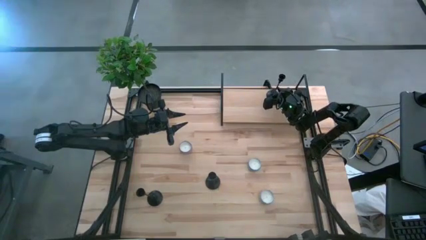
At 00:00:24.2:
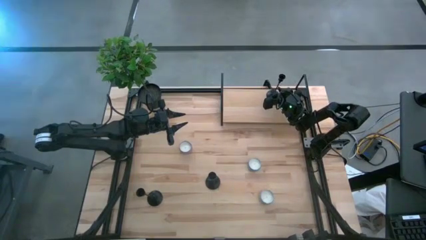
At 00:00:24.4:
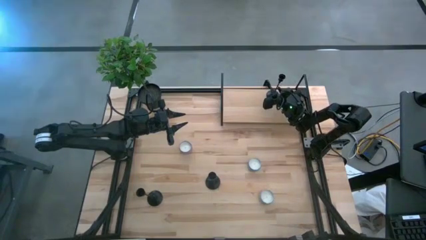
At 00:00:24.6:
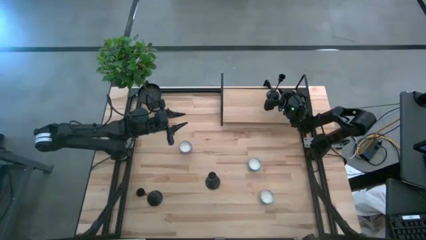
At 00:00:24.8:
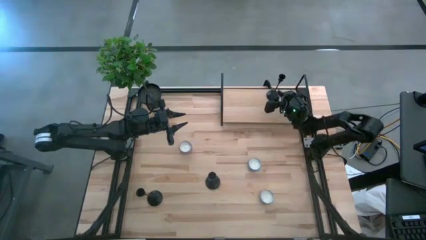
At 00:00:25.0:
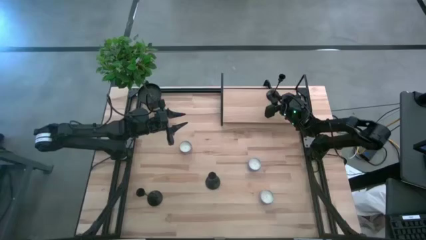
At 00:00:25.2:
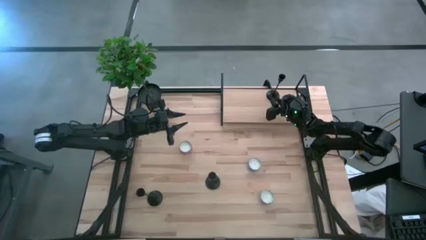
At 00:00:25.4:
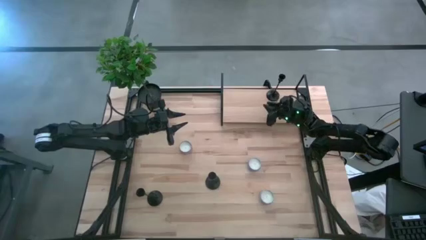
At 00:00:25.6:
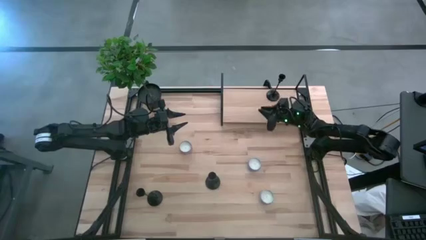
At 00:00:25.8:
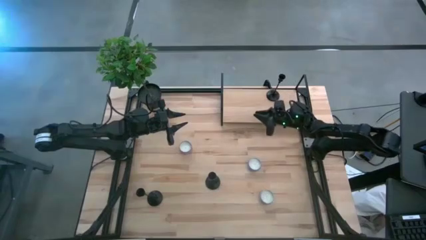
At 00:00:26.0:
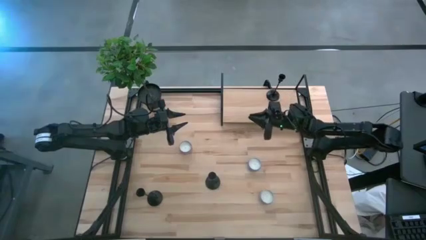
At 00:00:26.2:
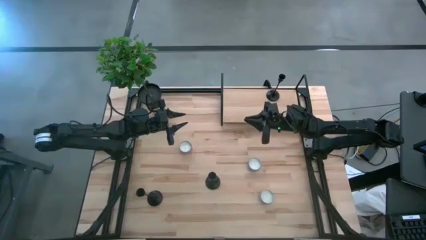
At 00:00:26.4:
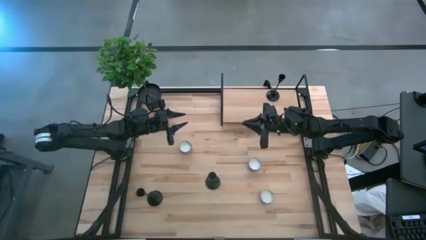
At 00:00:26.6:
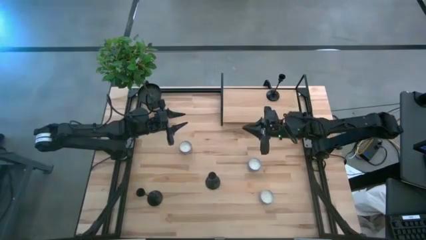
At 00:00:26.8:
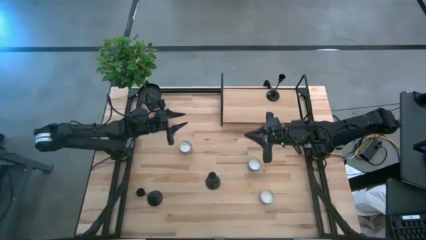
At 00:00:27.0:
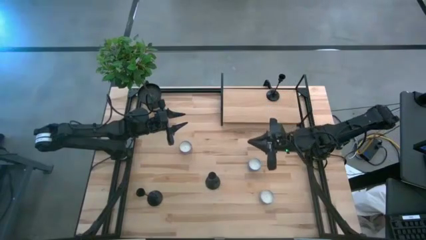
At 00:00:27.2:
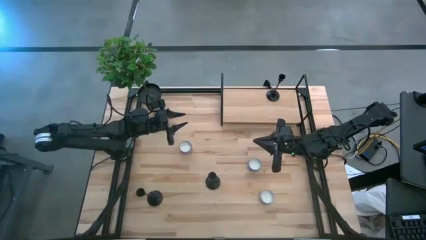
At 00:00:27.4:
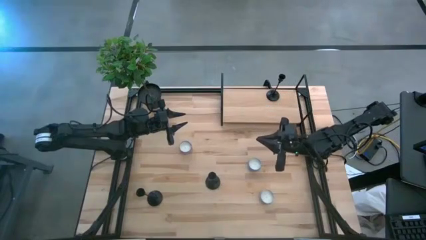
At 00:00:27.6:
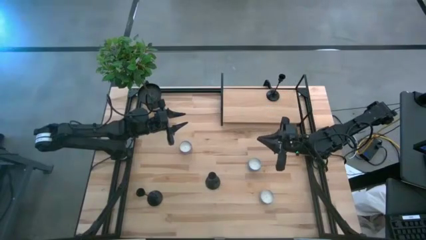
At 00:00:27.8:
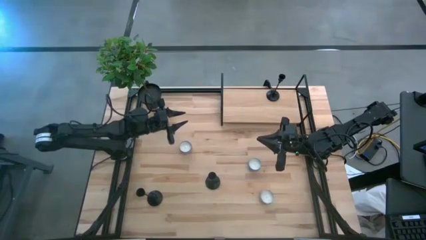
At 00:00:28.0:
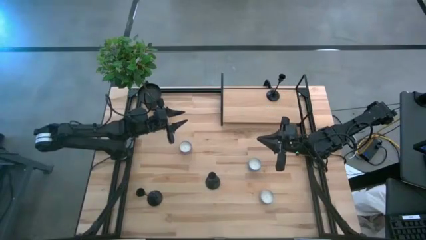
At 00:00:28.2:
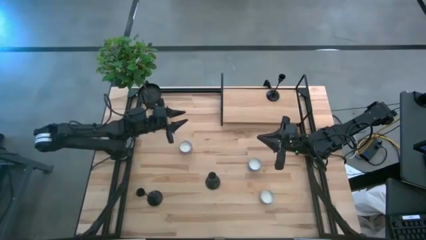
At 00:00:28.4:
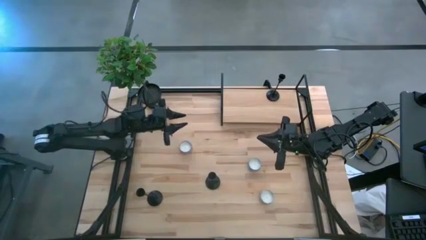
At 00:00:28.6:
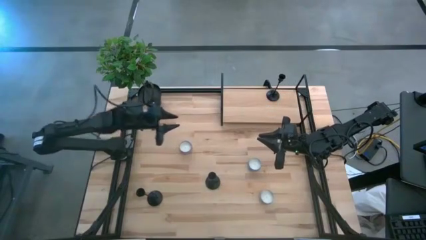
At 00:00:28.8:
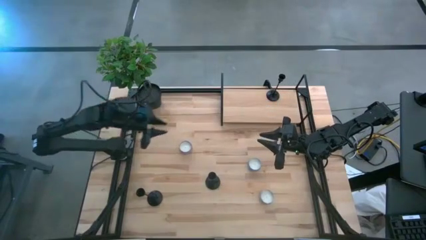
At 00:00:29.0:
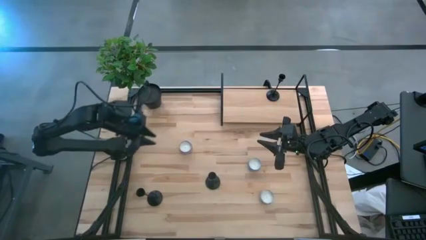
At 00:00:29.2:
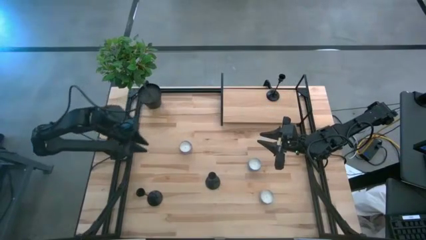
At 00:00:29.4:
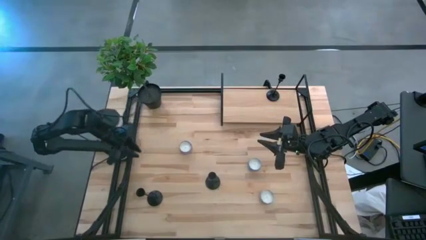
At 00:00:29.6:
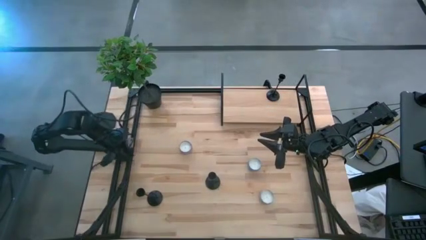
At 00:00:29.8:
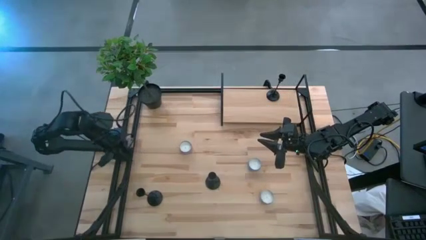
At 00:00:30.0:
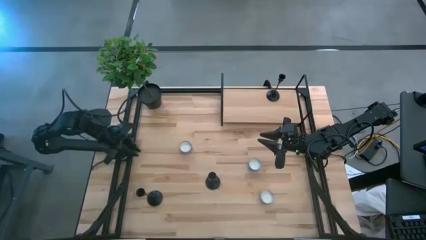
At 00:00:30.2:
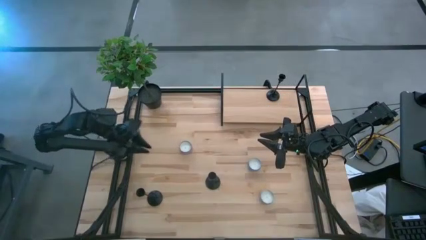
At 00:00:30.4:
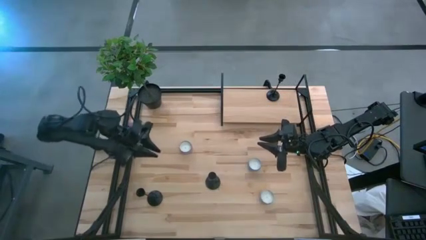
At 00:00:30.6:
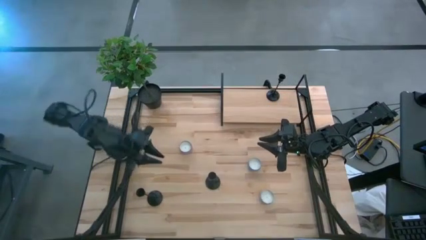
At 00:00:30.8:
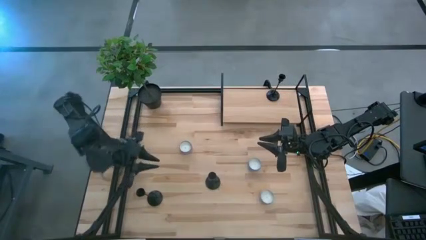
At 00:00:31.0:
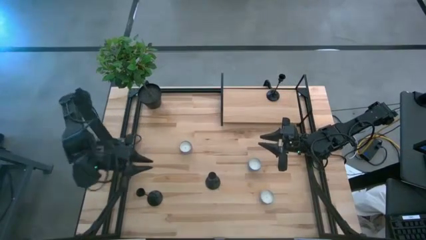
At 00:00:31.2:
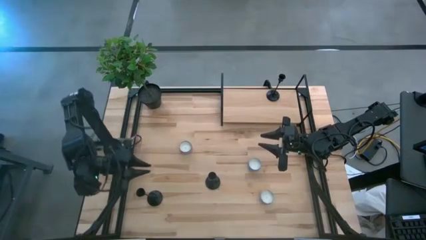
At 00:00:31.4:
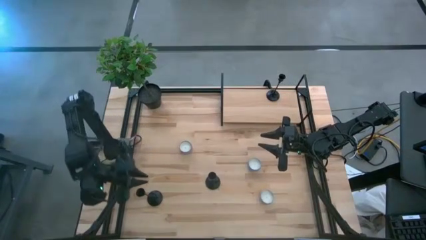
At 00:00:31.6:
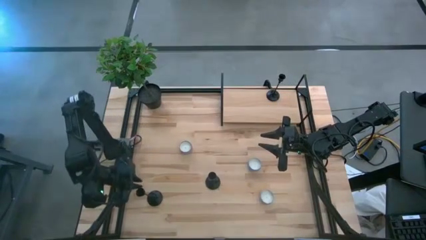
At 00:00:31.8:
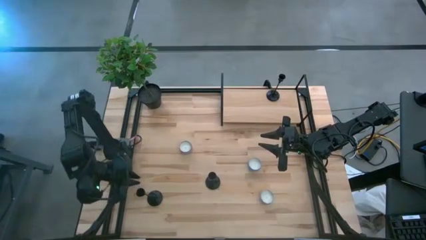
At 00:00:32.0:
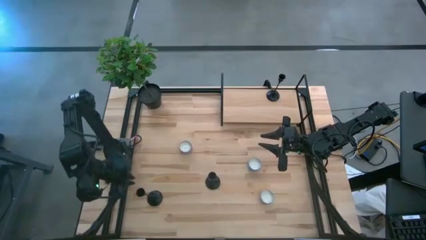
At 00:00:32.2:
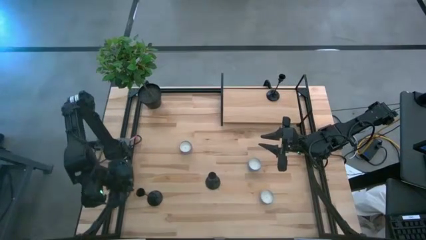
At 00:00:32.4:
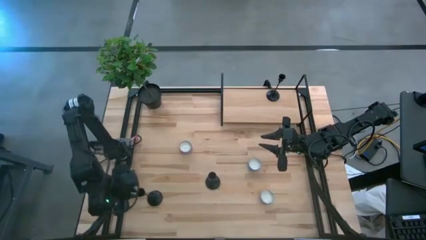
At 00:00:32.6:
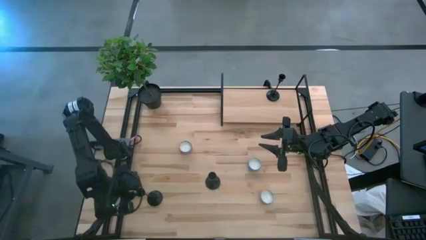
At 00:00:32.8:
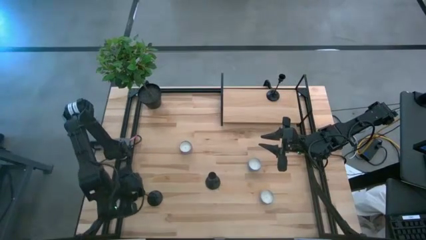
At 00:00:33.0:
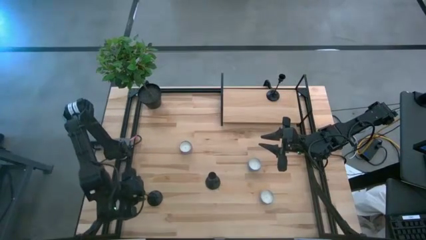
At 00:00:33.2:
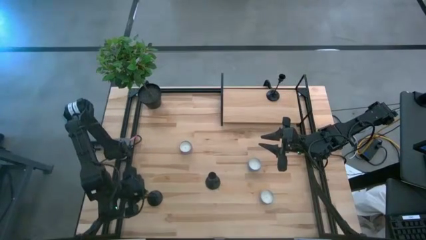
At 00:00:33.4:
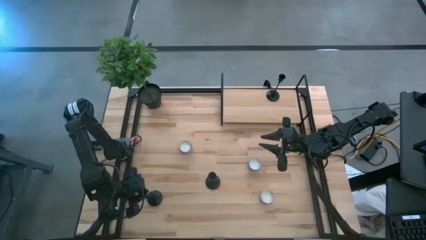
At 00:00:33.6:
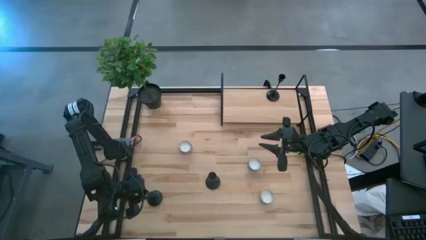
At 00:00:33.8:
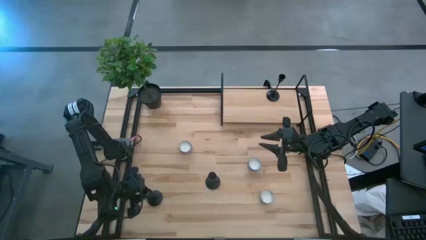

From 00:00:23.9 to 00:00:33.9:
Task: Pick & Place candle stick holders
Put the bottom left black candle holder on the shelf

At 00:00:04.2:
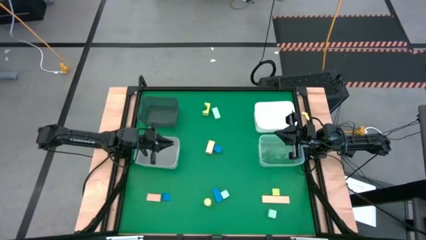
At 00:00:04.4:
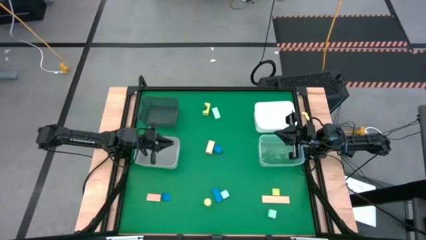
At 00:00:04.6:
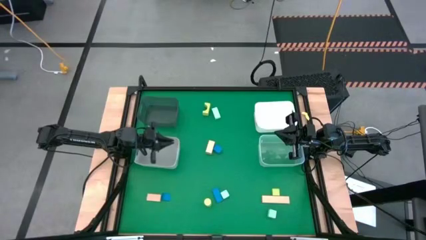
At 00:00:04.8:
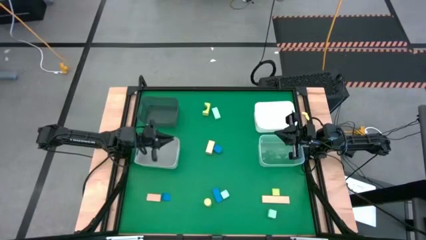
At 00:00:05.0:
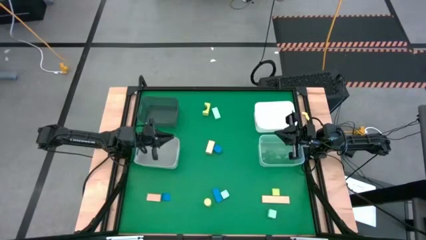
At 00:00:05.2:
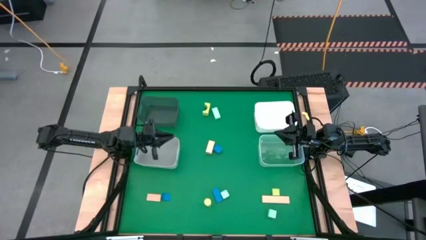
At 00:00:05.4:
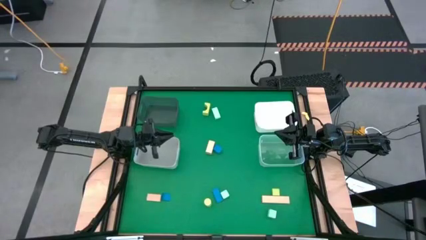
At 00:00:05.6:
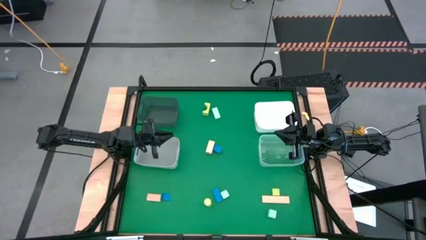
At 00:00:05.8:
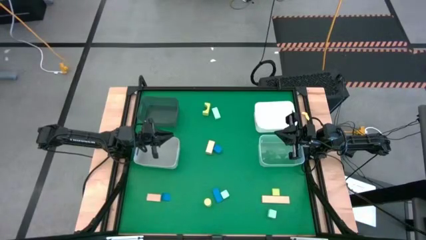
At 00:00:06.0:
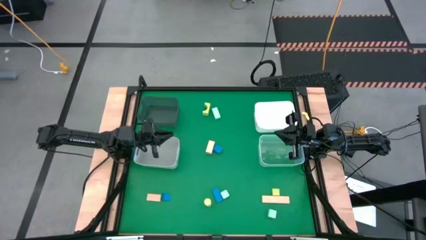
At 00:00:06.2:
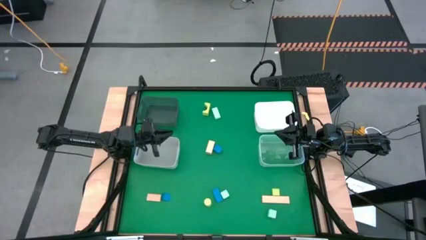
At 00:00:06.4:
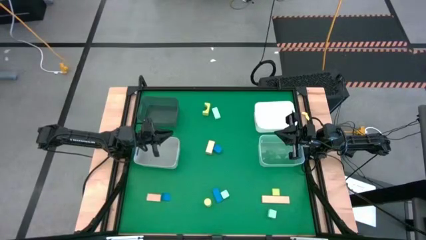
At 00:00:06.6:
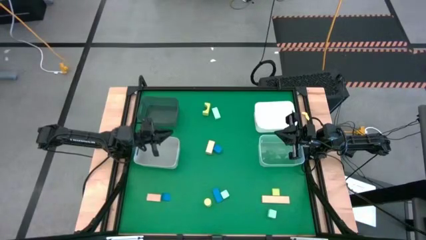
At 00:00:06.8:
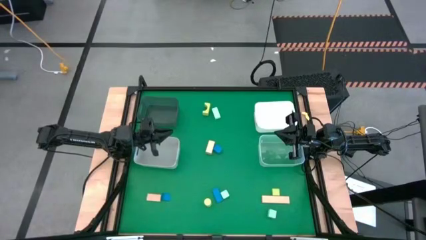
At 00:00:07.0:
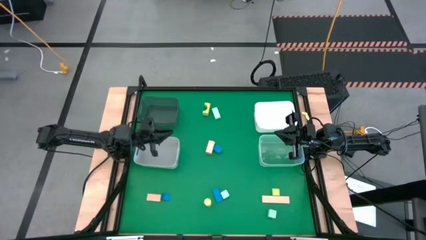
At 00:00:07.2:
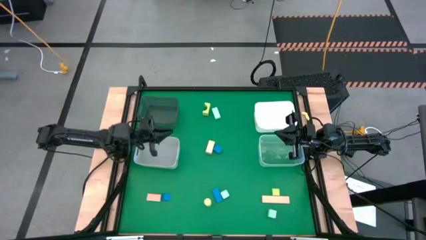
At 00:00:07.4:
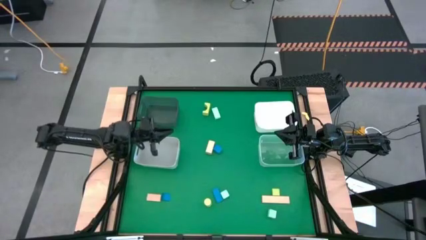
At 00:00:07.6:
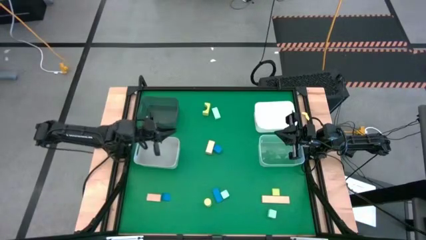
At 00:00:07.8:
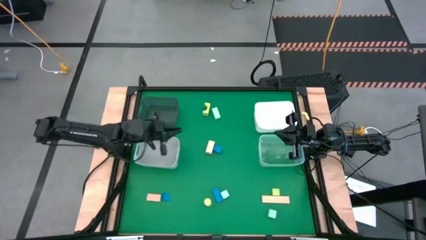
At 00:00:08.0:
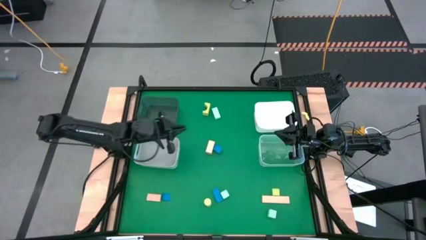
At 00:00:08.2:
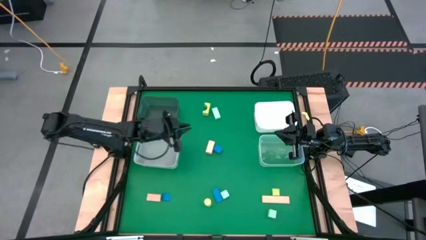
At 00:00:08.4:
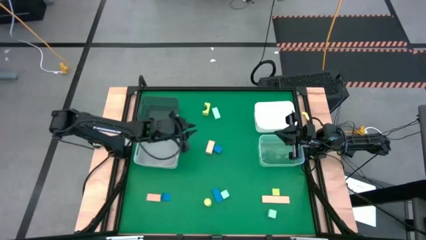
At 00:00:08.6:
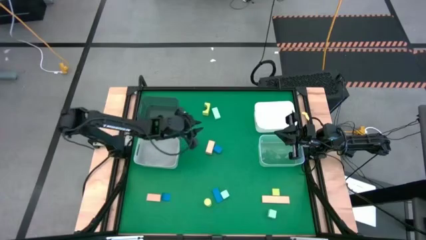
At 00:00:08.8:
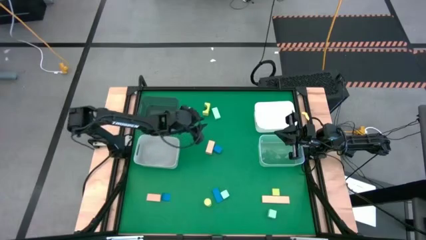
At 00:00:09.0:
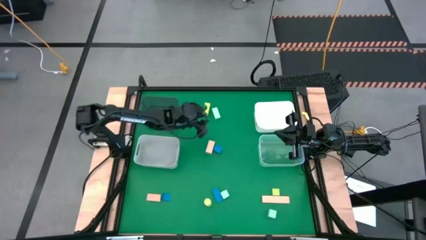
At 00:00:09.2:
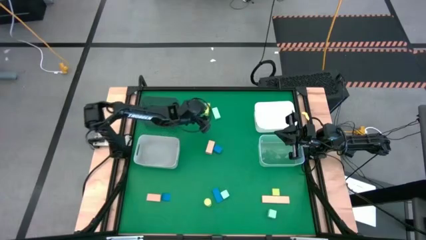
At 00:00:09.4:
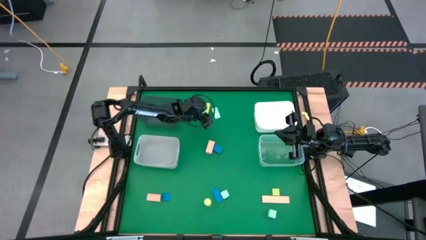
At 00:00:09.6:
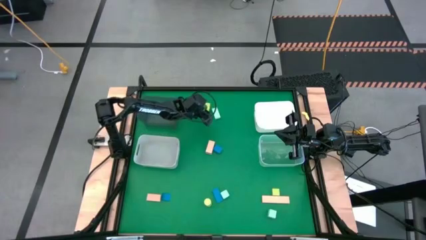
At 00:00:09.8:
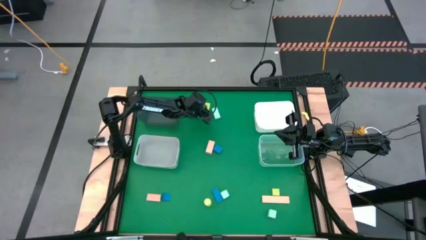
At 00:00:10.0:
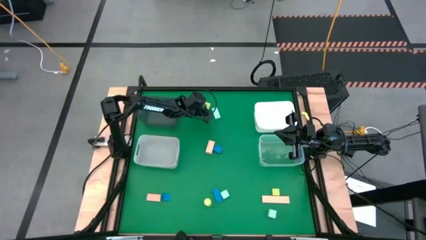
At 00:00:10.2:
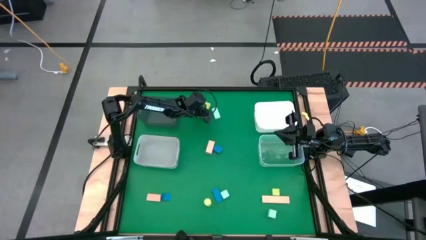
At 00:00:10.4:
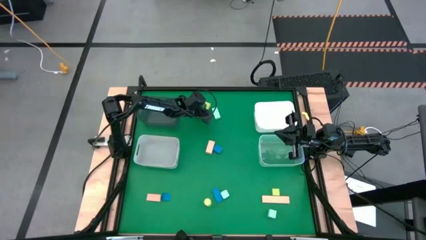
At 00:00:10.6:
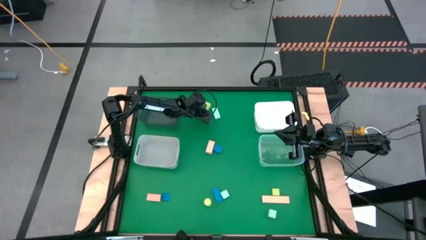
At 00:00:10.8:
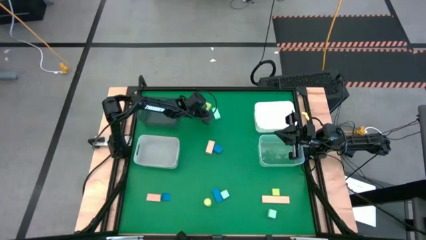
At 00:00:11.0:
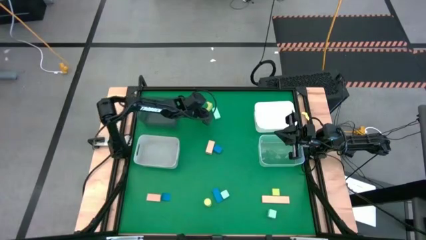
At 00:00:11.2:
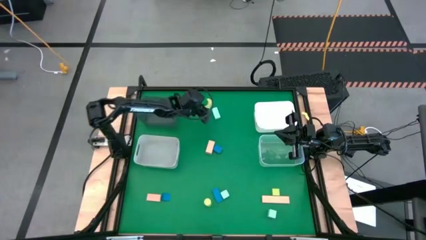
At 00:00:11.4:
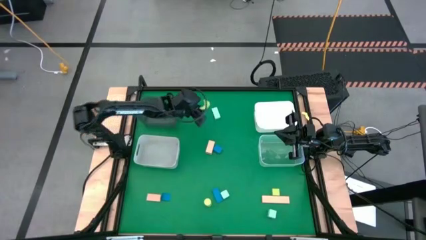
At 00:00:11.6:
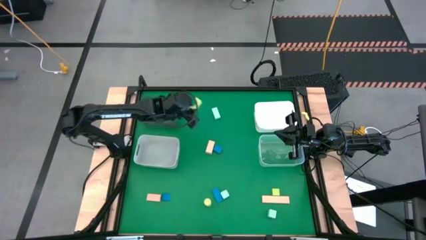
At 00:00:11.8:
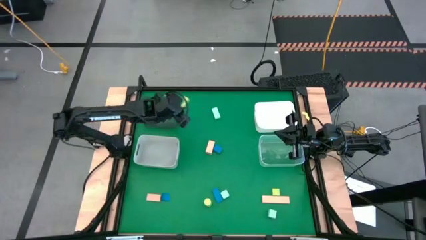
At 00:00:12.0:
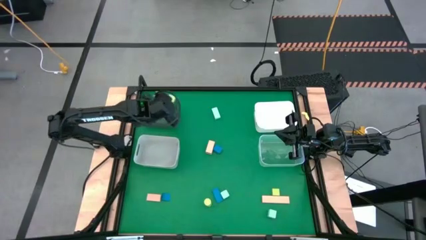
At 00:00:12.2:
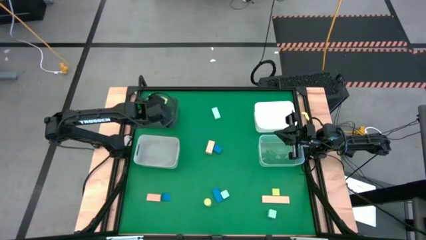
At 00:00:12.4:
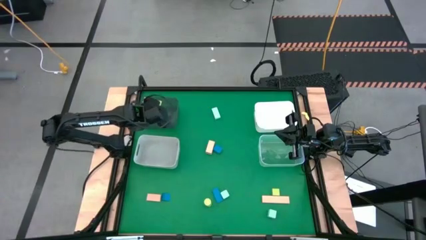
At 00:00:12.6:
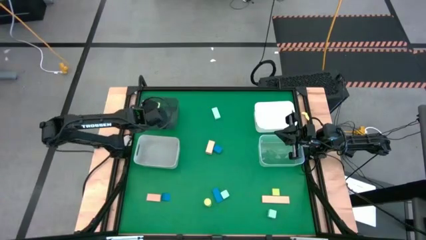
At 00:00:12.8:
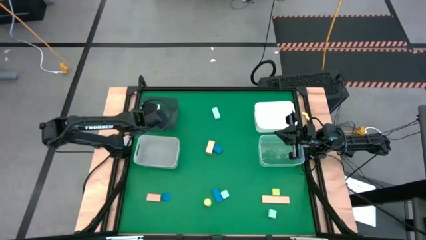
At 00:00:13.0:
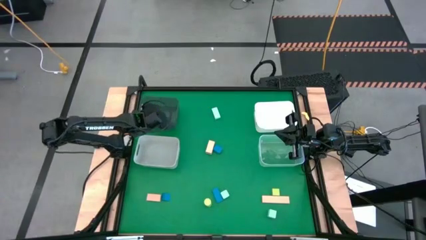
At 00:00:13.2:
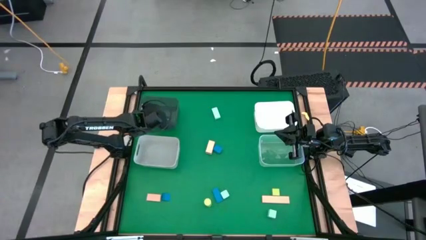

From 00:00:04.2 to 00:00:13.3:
Task: Sort & place blocks by color
Put the yellow arch block into the black transparent bin
